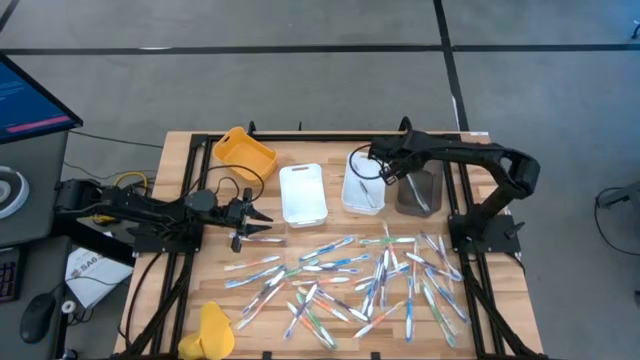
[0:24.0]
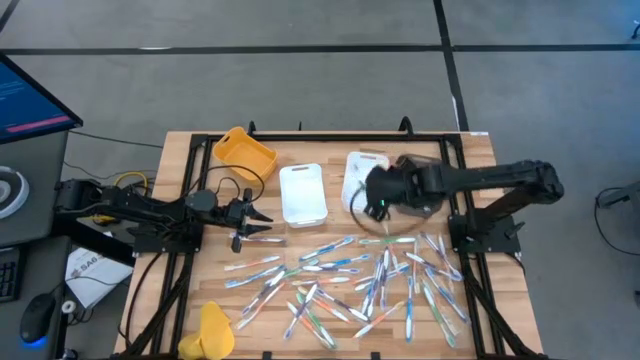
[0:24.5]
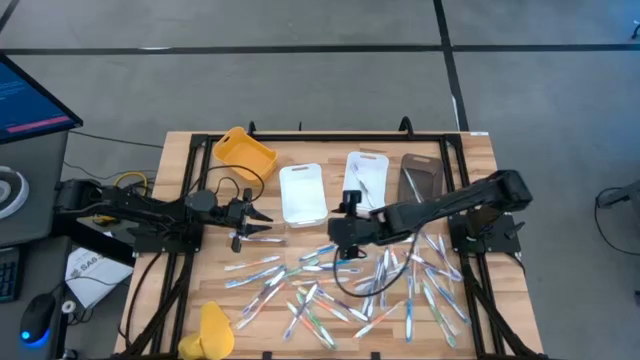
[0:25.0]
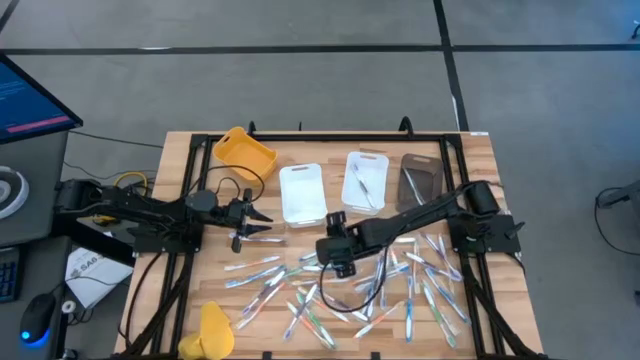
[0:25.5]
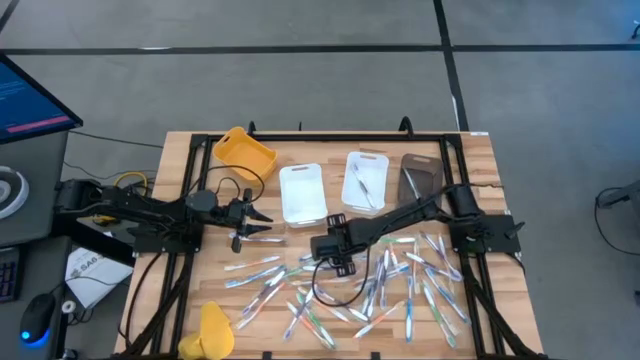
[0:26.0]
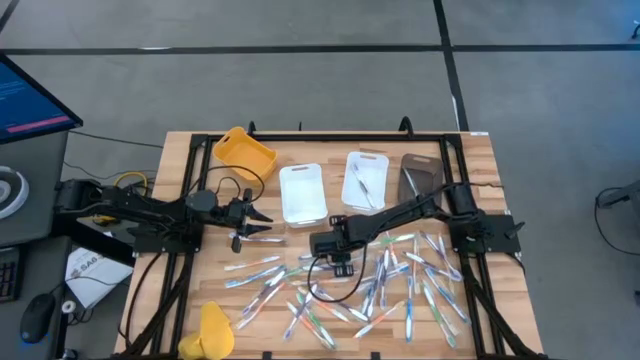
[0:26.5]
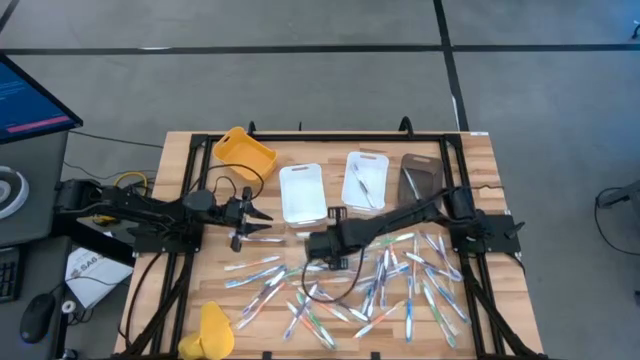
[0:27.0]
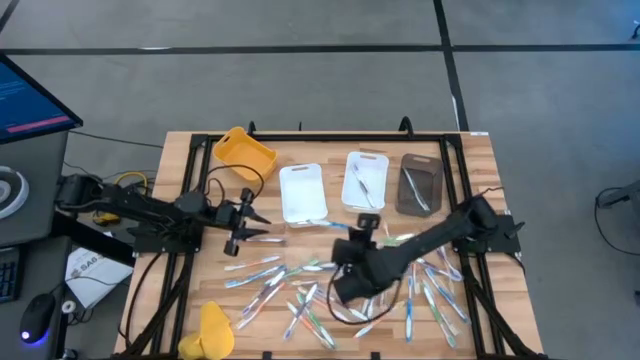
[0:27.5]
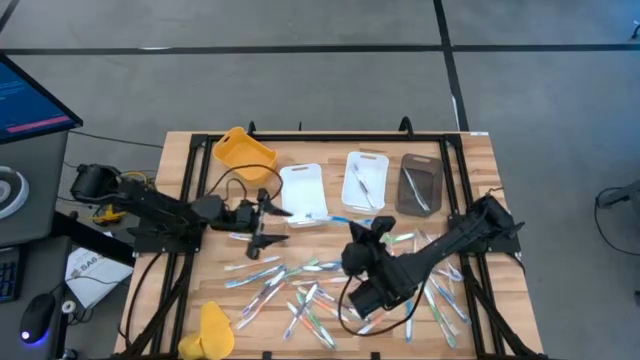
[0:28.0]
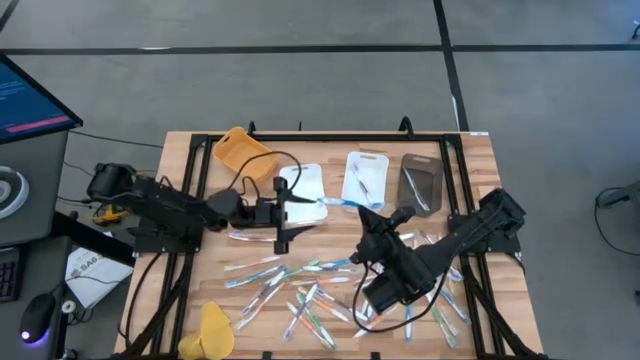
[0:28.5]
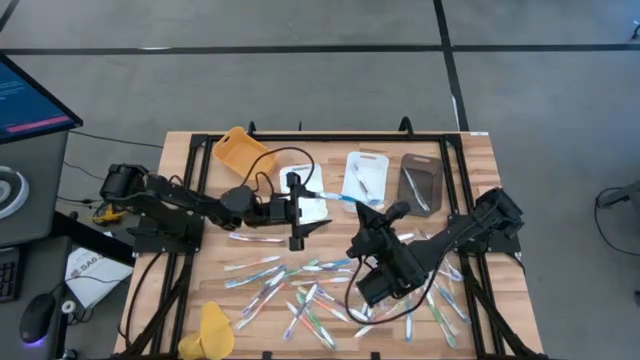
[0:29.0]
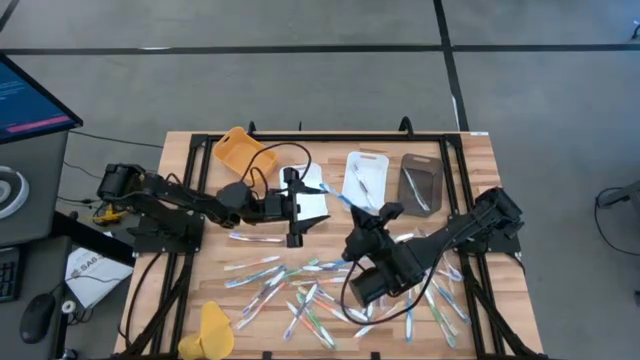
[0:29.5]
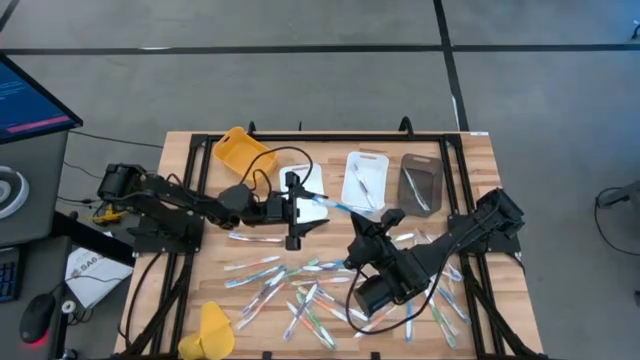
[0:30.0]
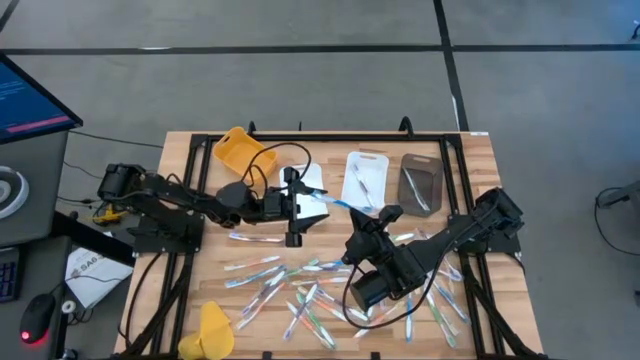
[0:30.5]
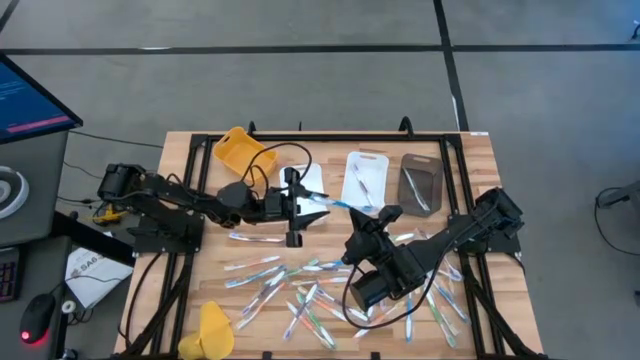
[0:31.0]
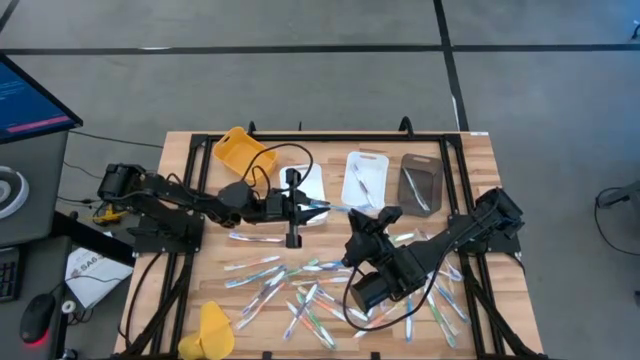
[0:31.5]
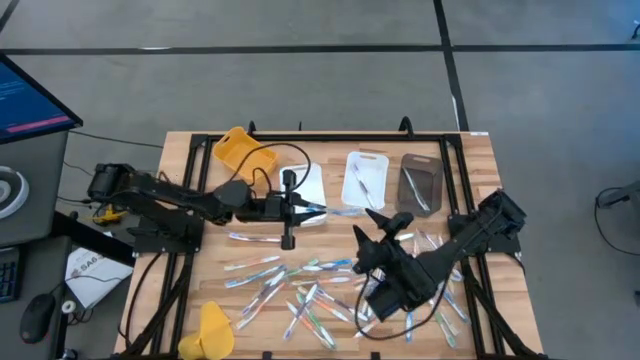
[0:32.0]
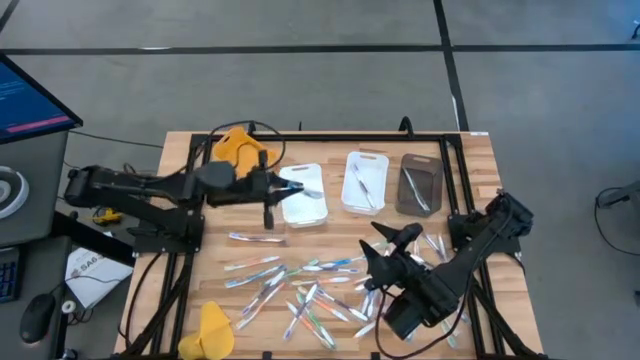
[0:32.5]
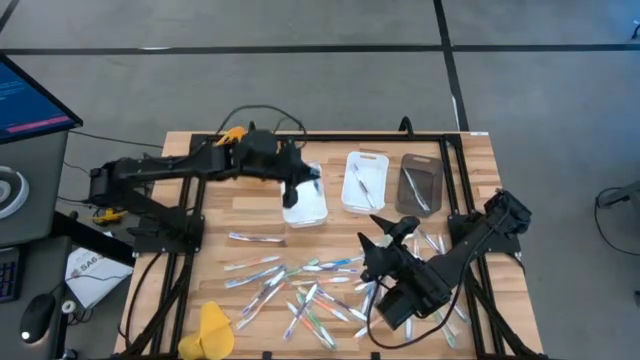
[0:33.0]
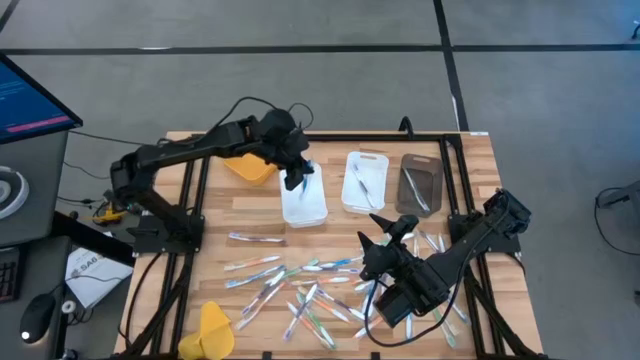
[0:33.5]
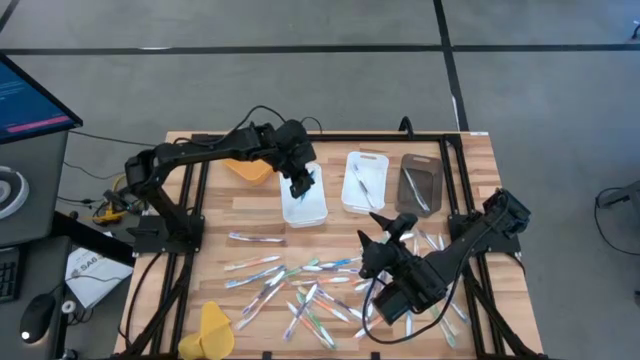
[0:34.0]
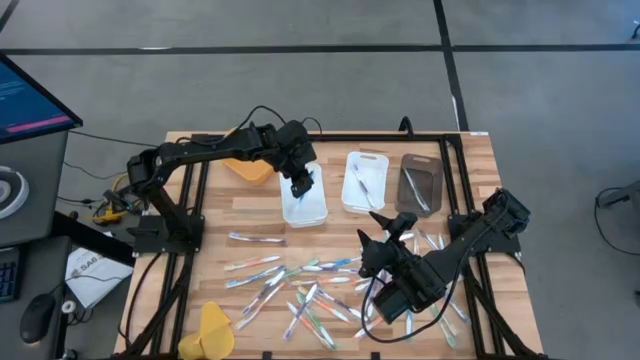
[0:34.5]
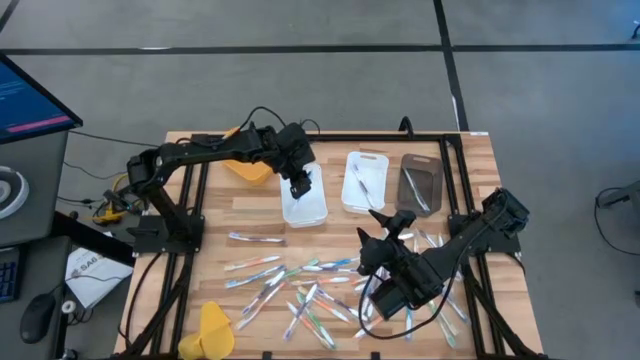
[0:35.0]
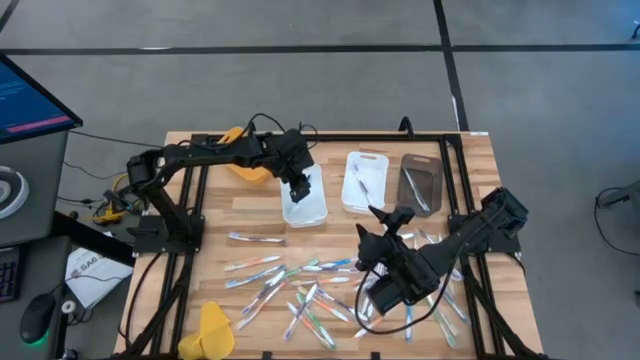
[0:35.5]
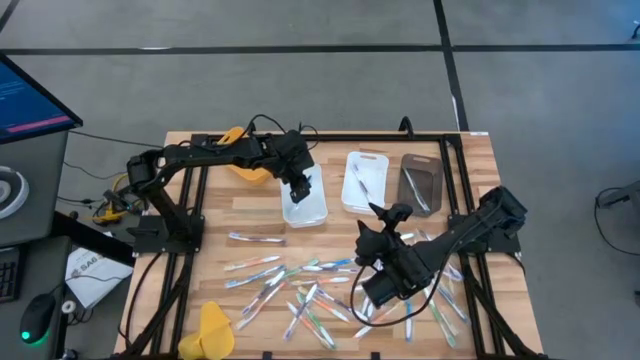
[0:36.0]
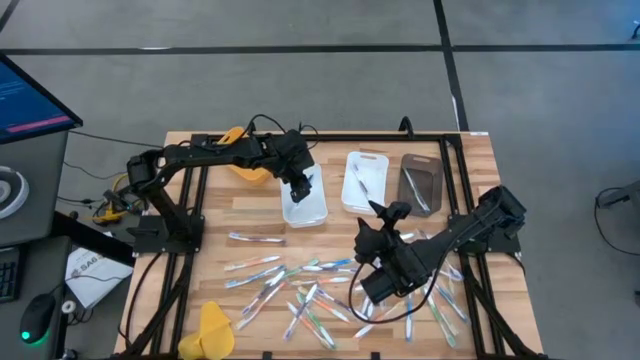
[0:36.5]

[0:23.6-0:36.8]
Task: Pick & Place Toothbrushes
Put the blue toothbrush into the left white bin

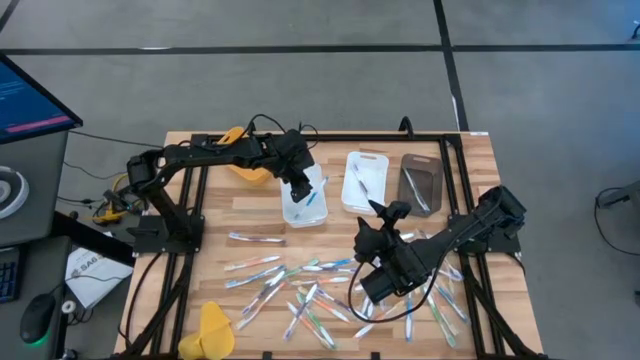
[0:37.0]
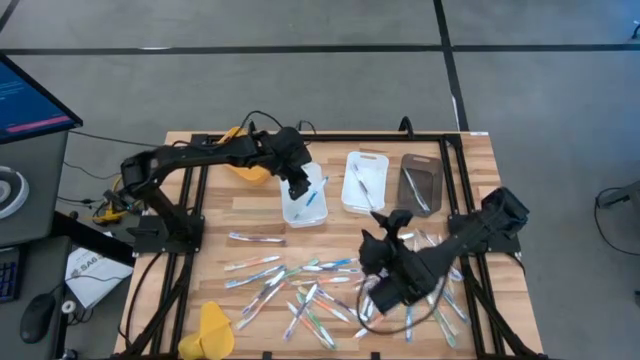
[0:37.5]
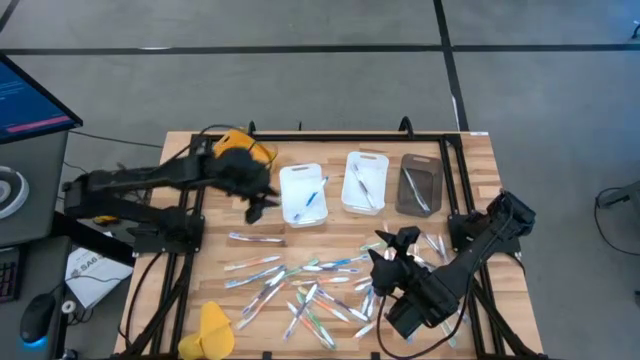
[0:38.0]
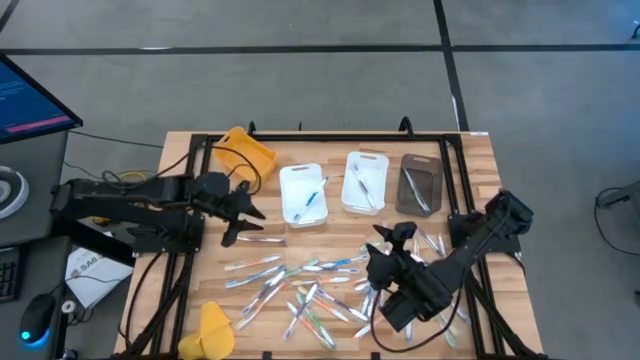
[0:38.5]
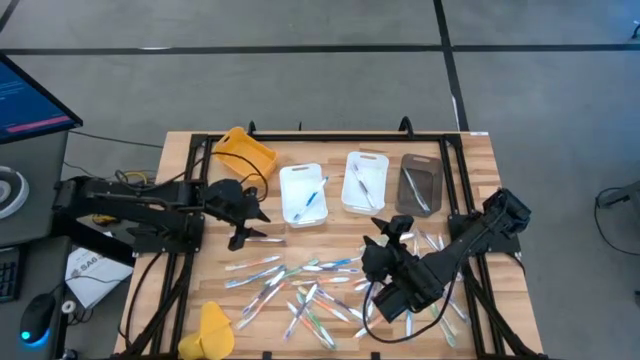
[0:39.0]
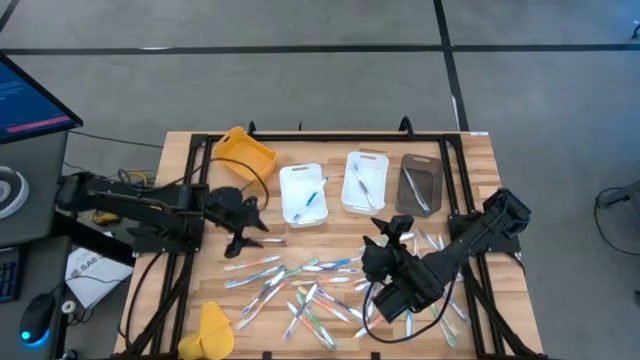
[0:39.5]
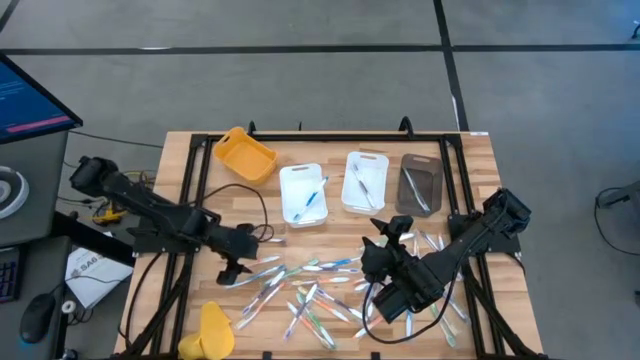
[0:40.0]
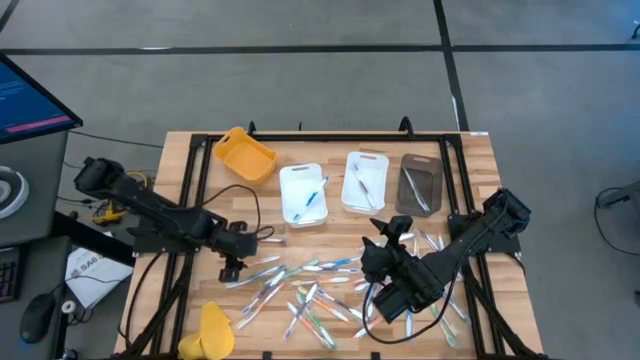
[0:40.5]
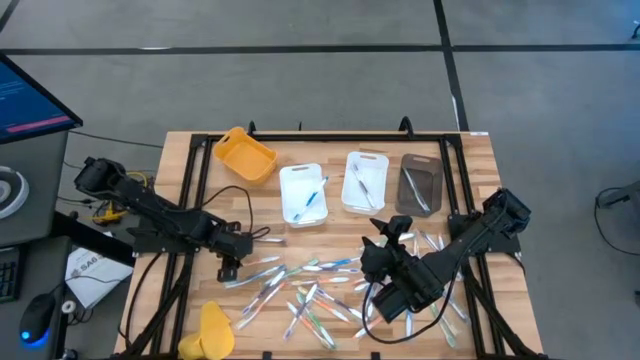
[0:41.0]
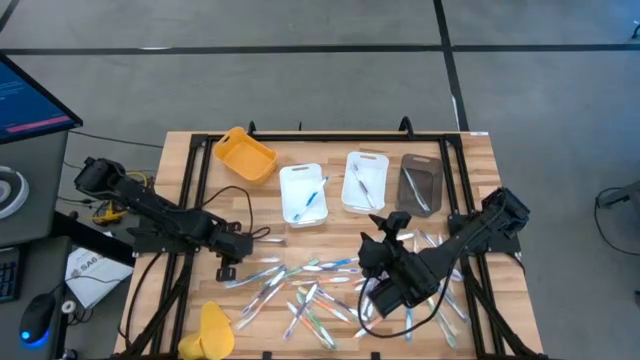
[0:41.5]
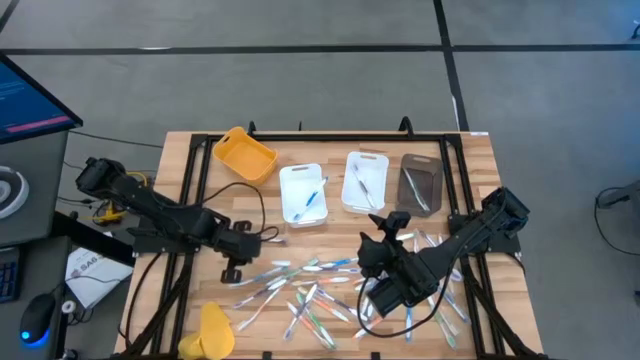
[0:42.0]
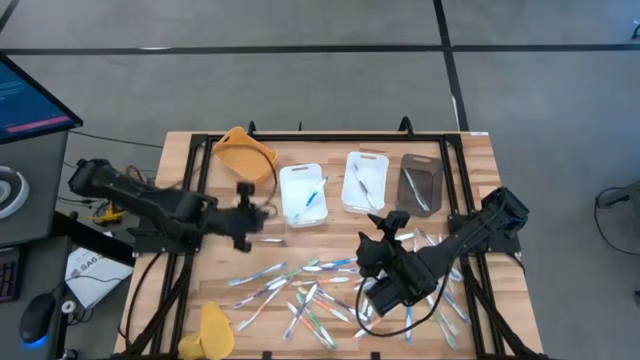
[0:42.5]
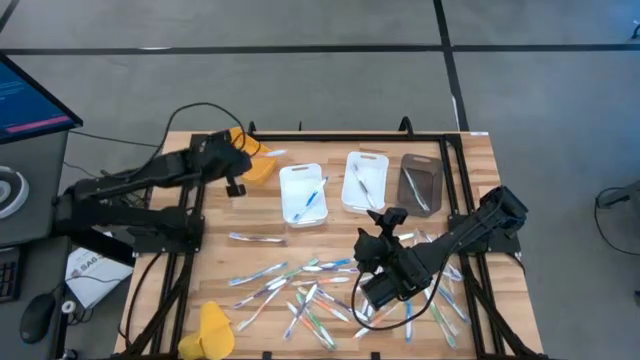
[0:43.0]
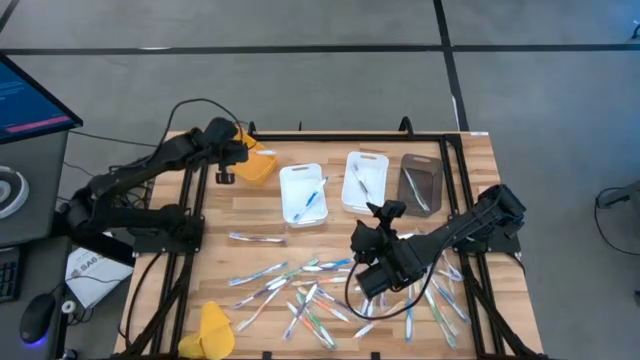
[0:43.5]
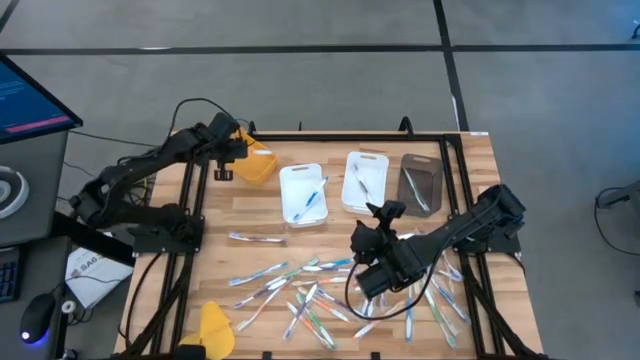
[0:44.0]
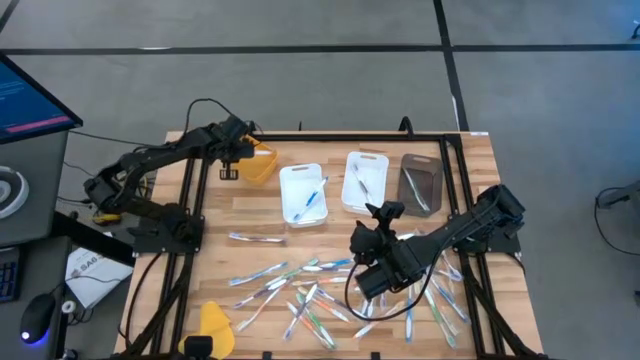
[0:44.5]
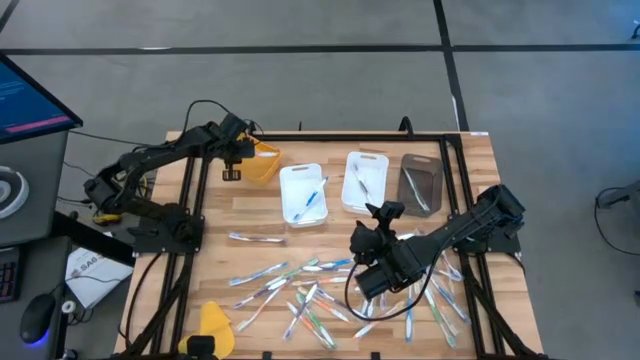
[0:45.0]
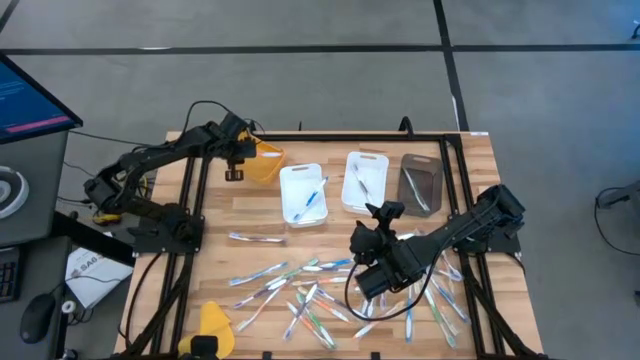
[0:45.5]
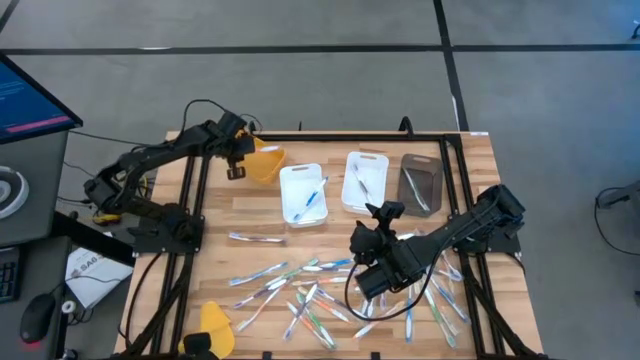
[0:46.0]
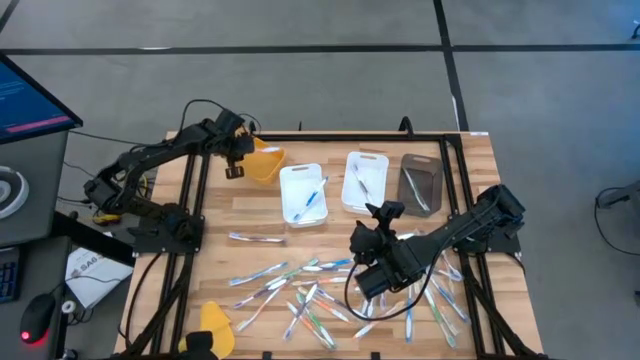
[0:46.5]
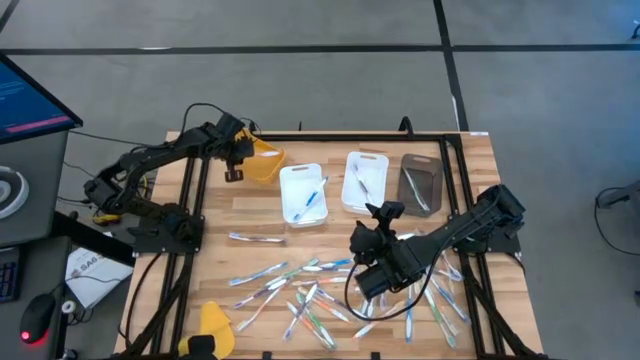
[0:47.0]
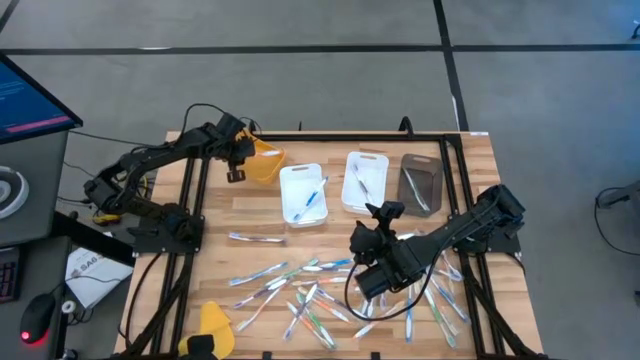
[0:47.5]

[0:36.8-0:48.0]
Put the orange toothbrush into the orange bin
